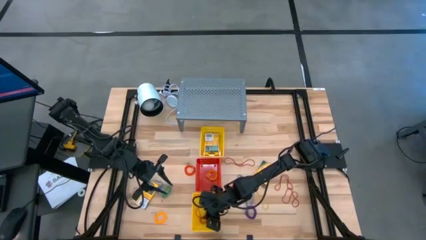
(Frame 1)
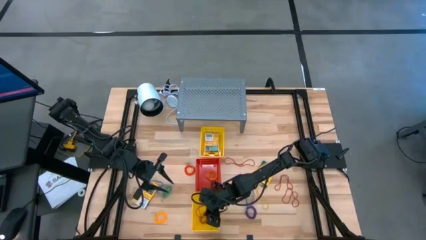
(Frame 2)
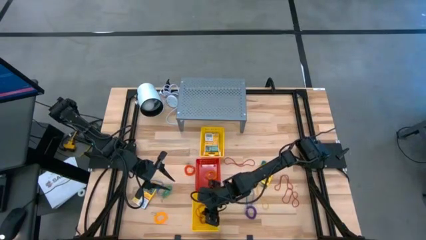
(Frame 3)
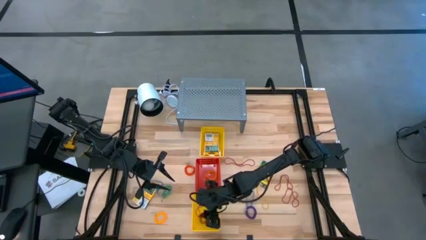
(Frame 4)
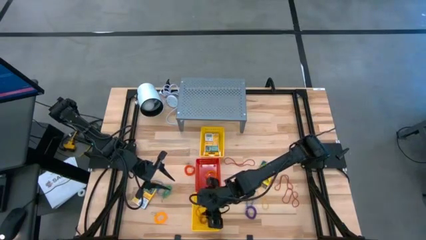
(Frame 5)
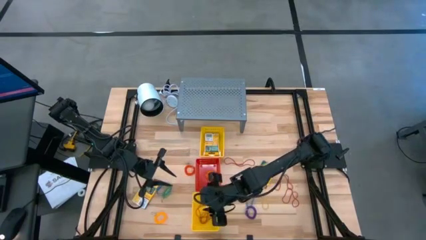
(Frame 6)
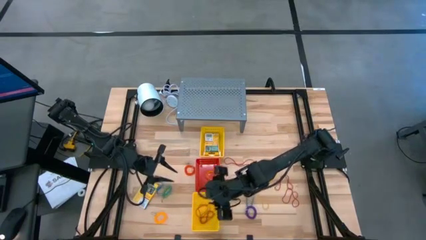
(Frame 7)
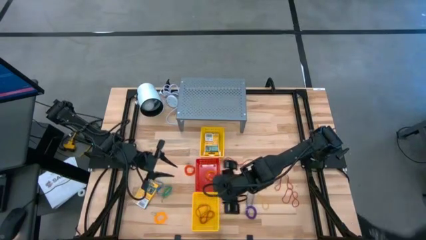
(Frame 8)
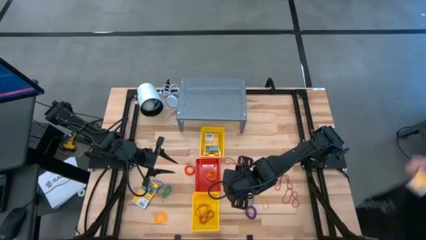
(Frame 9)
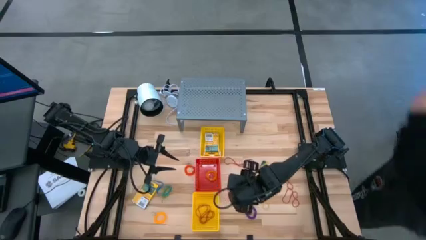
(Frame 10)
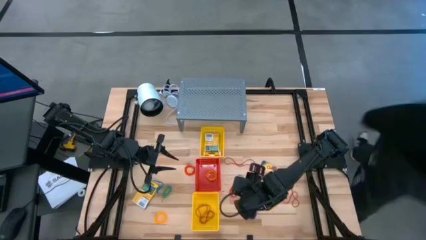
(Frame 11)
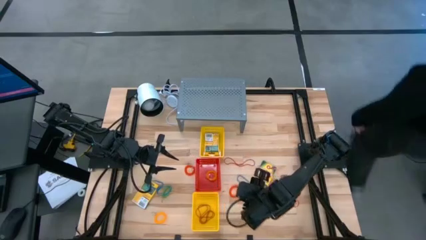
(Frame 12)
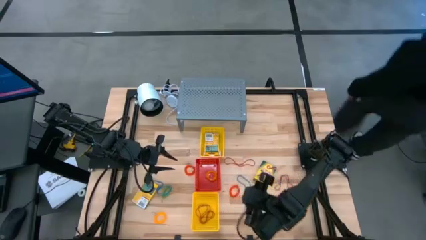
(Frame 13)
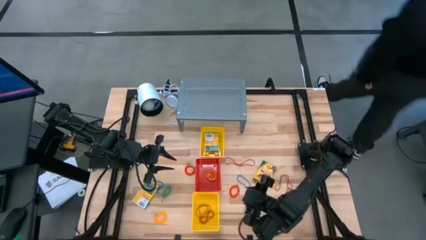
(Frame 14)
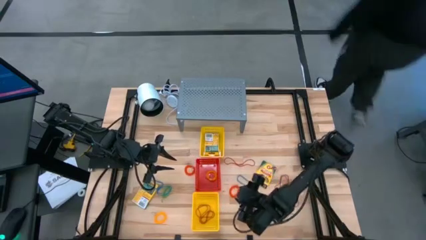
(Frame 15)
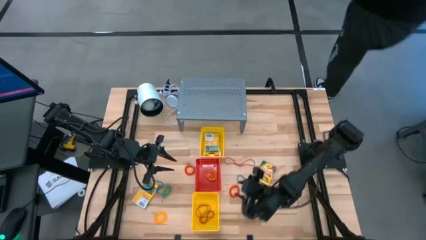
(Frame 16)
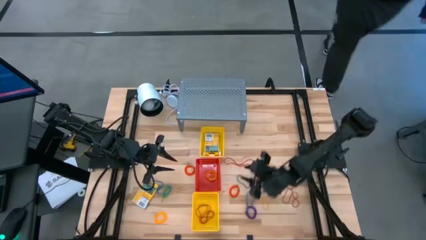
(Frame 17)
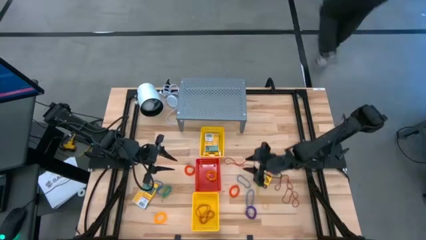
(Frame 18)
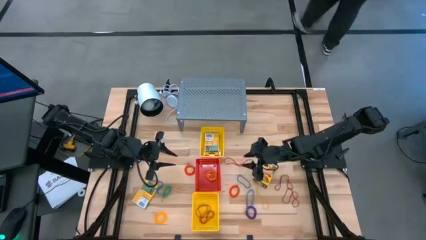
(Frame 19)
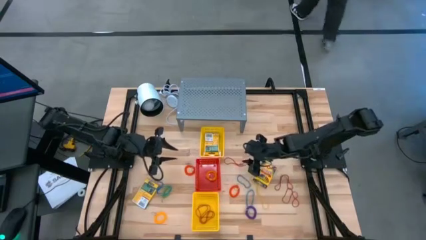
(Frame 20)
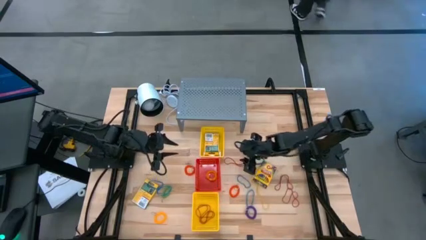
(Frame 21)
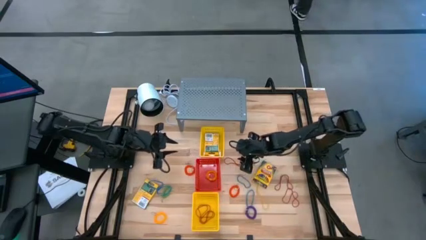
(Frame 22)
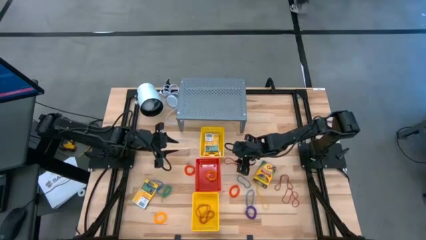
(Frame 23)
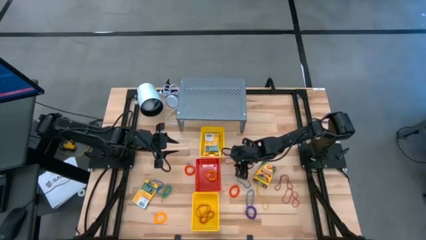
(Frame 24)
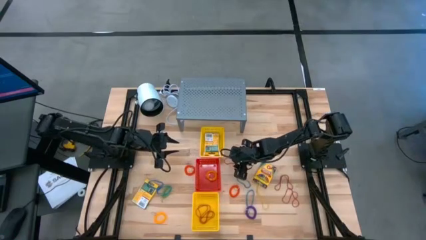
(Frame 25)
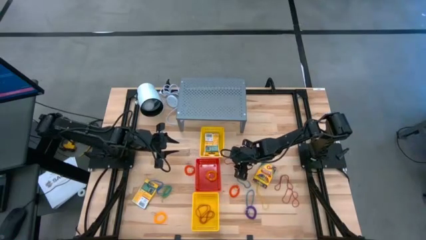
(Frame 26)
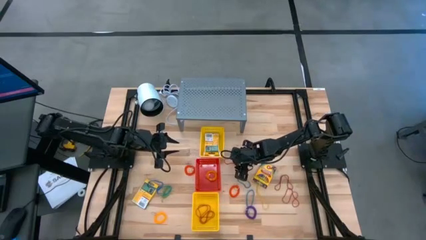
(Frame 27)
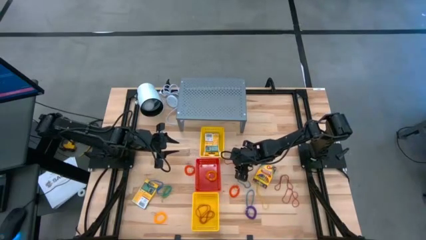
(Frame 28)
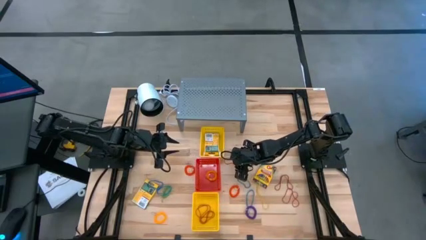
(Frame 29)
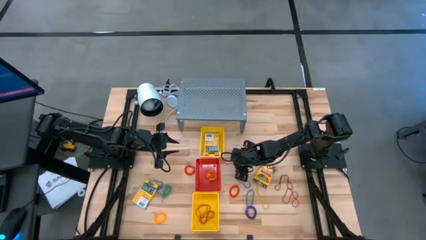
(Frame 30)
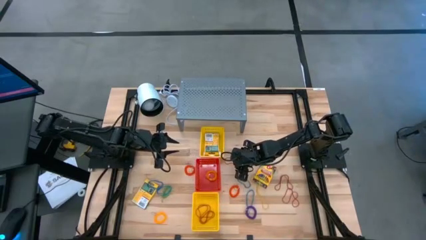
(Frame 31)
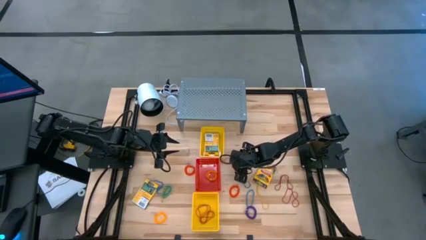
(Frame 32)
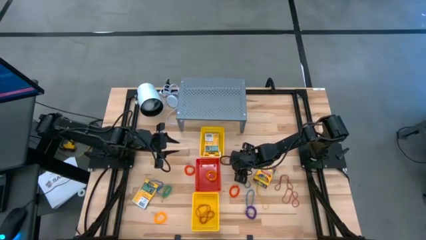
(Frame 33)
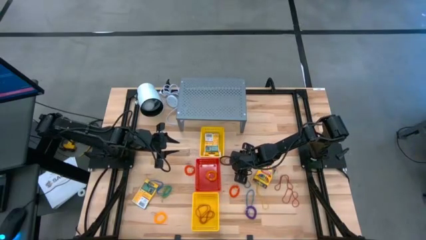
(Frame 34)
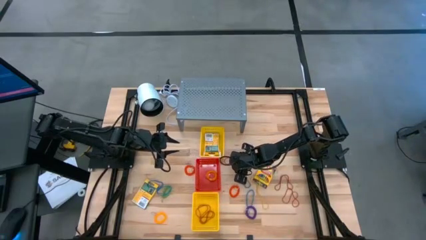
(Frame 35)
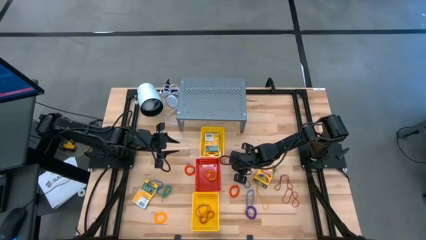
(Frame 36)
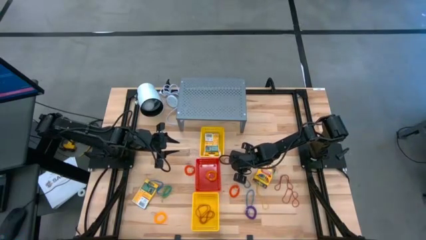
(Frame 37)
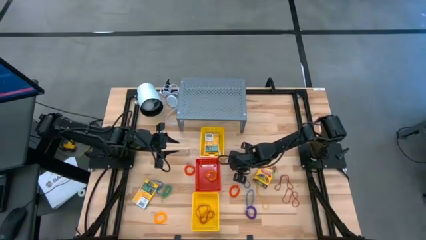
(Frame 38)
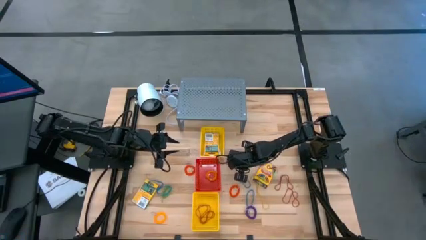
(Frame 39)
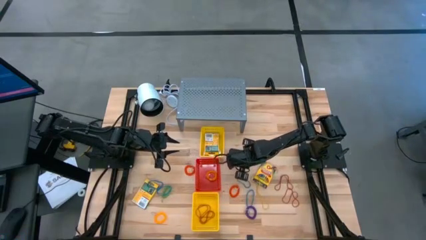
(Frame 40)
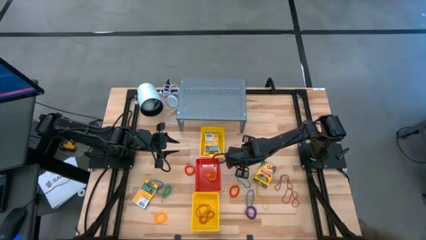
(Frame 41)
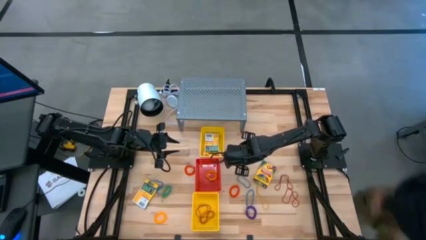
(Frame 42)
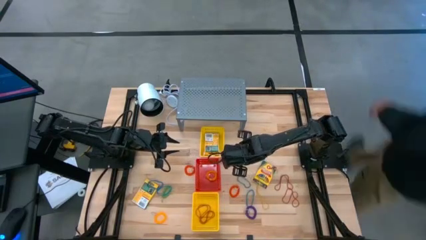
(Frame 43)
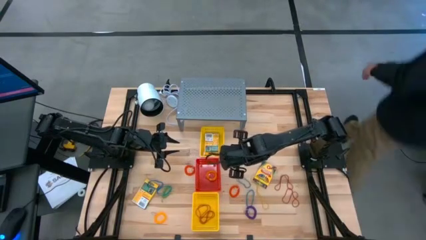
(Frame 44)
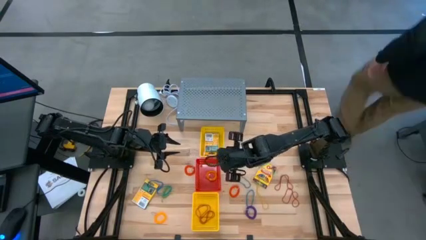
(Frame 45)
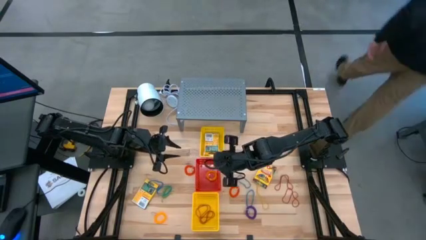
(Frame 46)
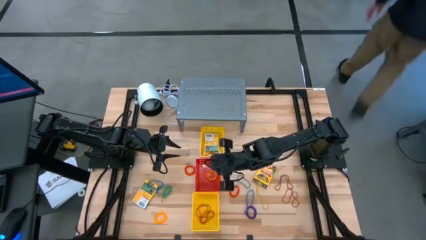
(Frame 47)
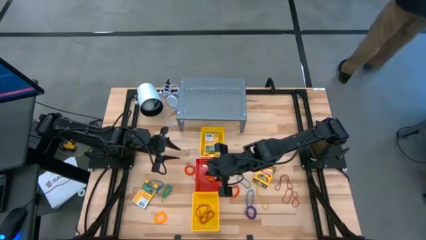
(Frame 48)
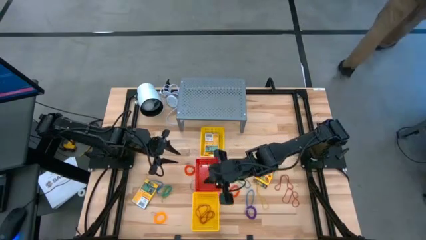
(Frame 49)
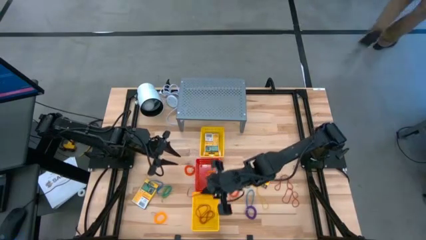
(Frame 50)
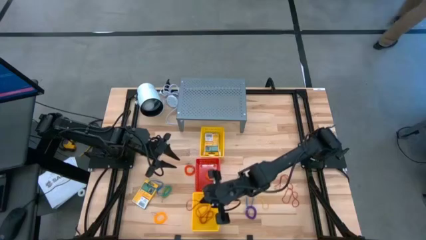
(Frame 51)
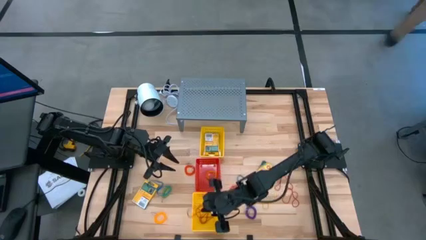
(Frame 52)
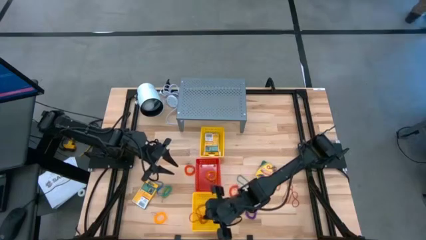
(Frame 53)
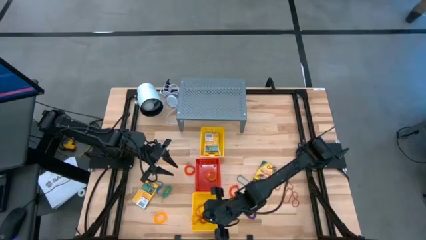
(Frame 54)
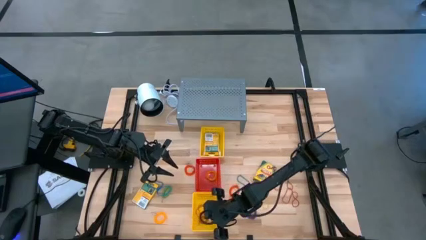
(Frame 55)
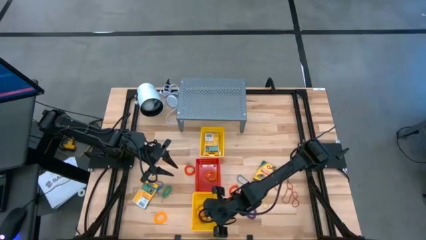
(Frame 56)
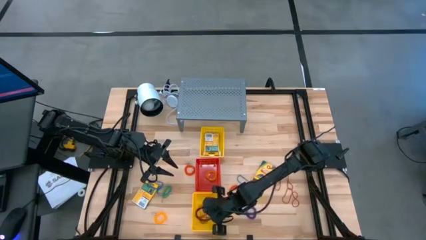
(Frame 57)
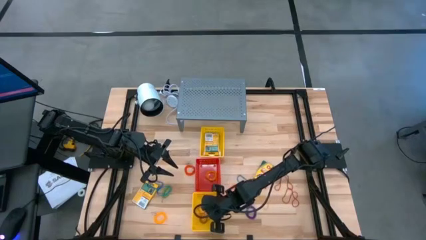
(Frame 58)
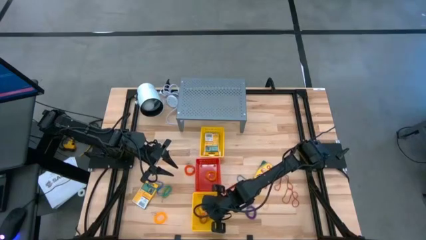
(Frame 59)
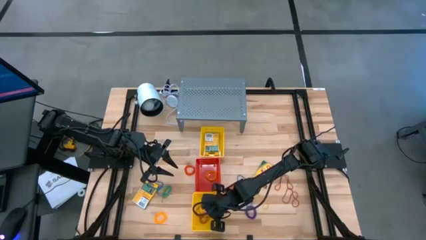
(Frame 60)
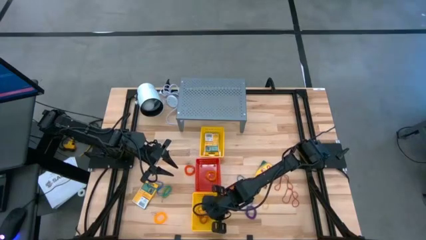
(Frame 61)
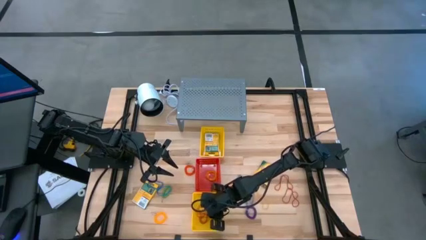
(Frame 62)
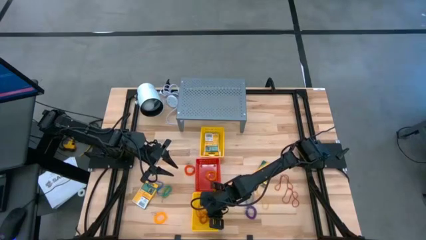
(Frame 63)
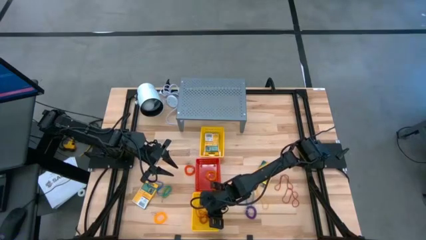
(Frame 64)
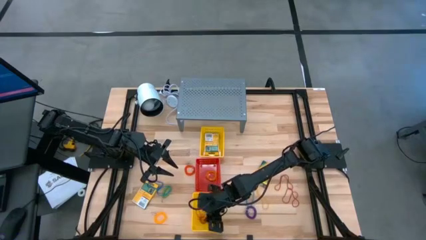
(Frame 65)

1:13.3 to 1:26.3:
Task: Pick & Place Office Desk Supplies
Put the red rubber band into the bottom yellow bin

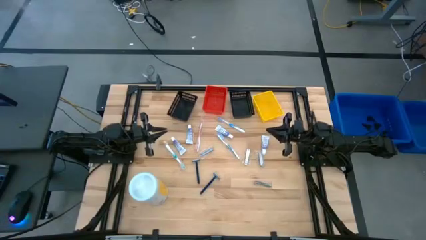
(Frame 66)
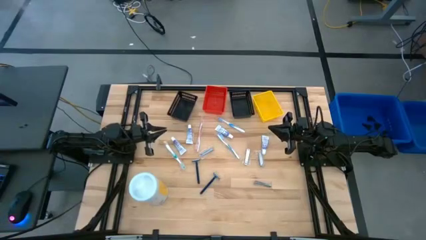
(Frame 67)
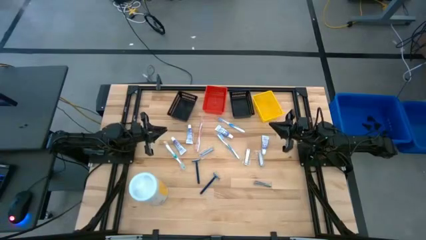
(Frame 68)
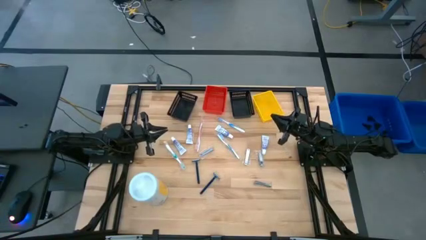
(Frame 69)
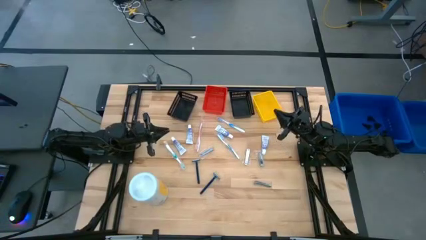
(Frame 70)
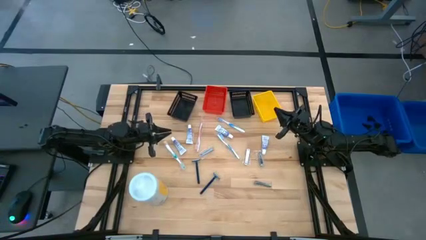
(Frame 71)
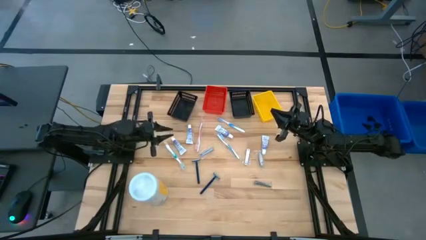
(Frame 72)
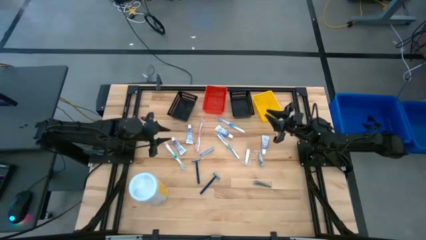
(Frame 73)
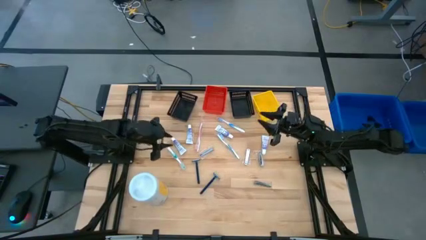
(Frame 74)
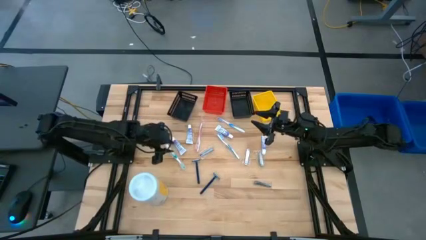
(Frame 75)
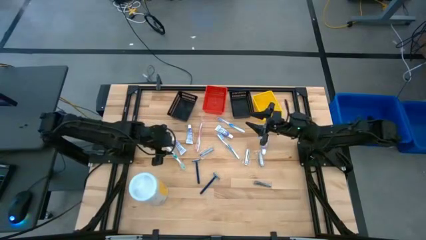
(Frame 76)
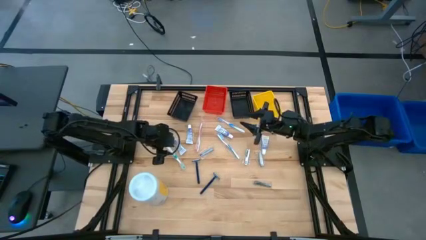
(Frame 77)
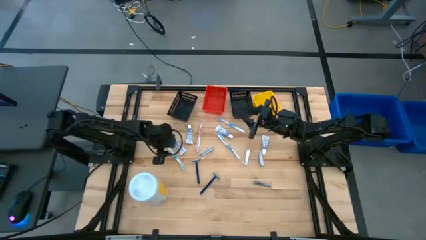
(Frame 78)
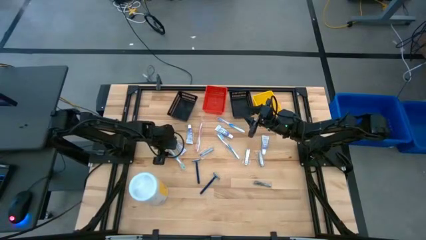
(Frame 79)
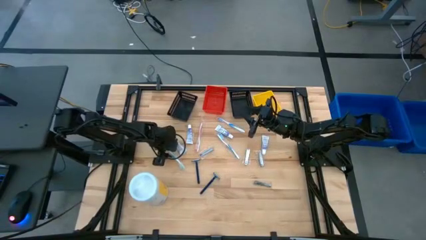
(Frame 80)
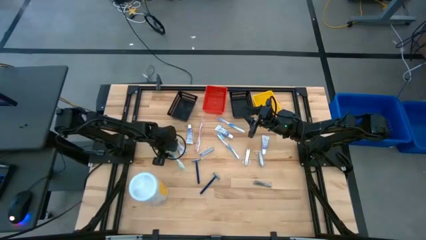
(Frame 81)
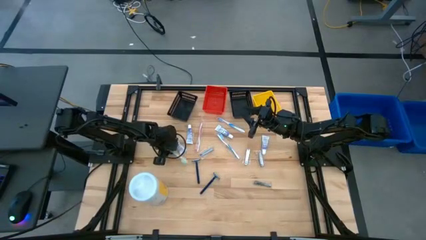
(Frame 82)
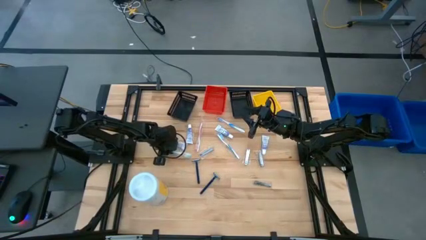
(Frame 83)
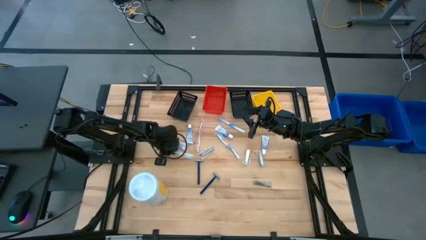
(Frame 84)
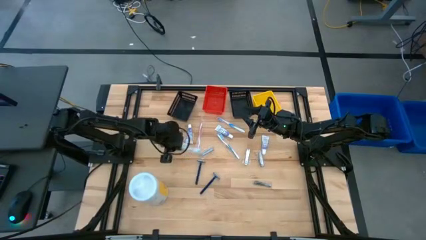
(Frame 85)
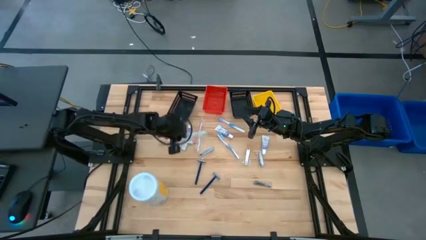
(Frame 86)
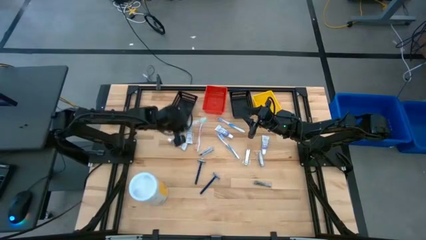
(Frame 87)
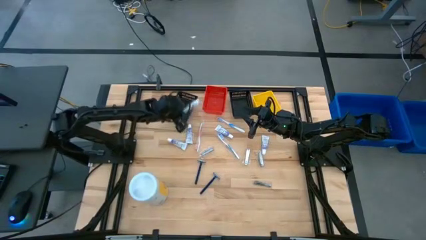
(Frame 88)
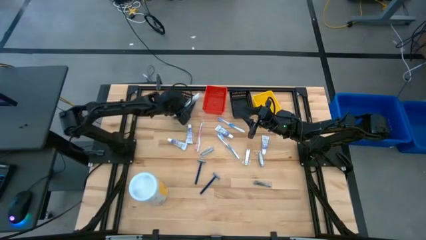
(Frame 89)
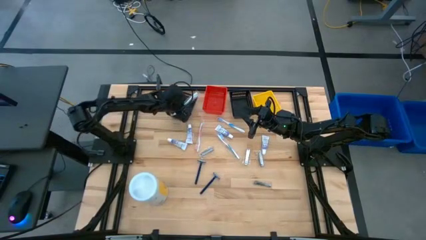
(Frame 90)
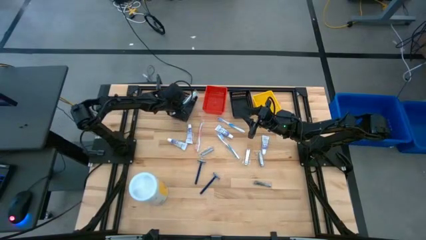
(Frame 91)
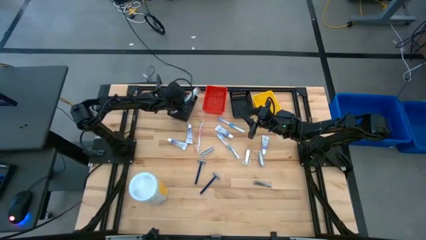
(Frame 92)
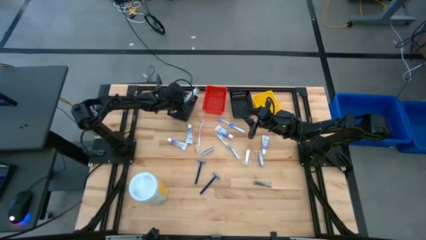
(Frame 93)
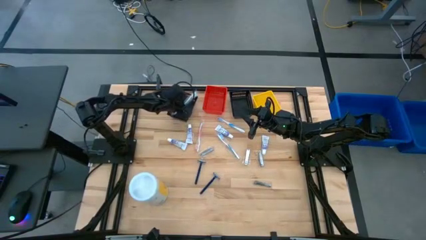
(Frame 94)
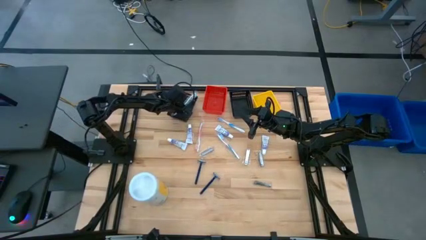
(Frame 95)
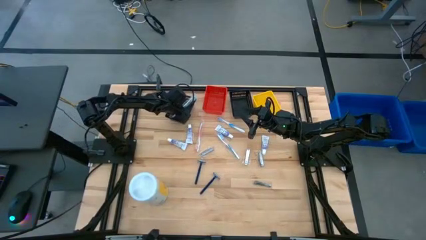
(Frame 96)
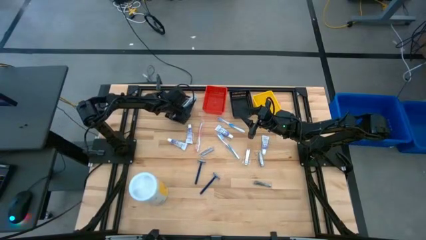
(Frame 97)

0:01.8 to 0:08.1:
Task: Pick & Place Travel size toiletries
Put the light blue toothbrush into the left black bin
